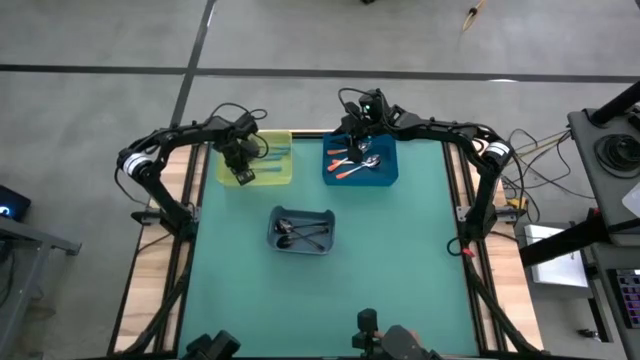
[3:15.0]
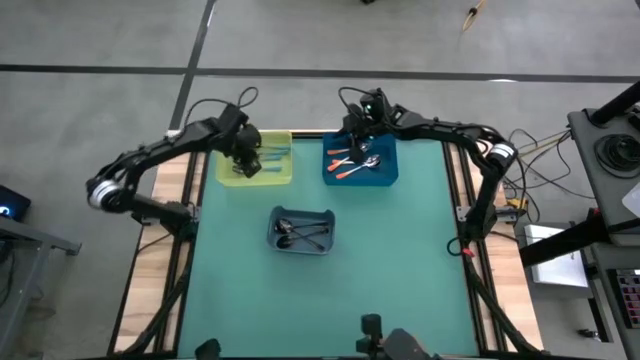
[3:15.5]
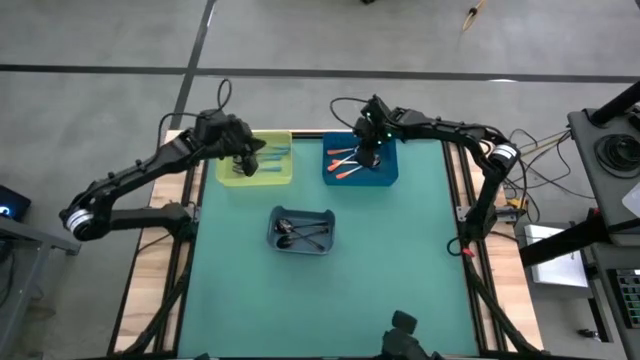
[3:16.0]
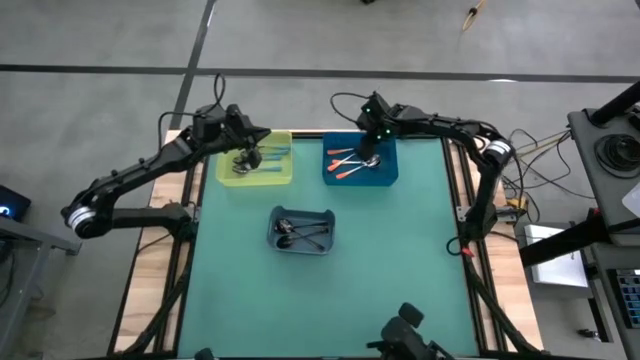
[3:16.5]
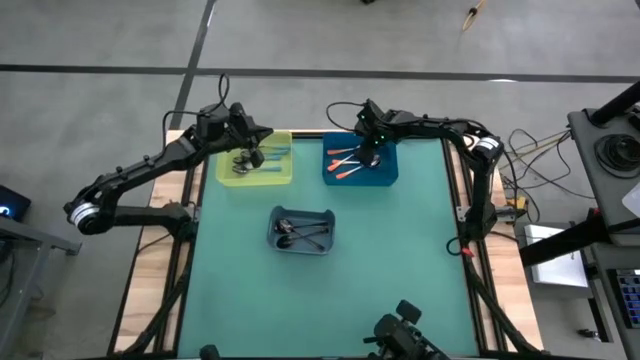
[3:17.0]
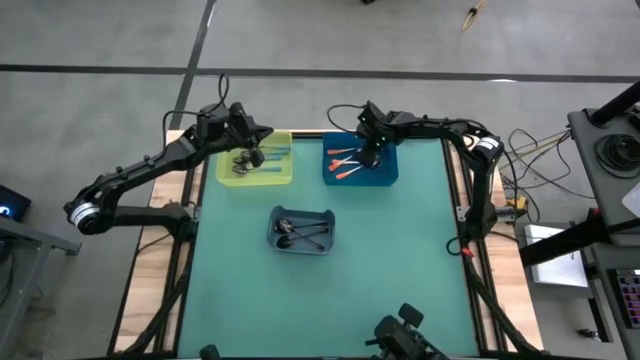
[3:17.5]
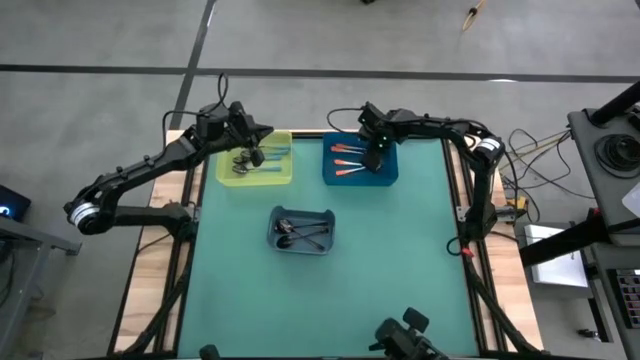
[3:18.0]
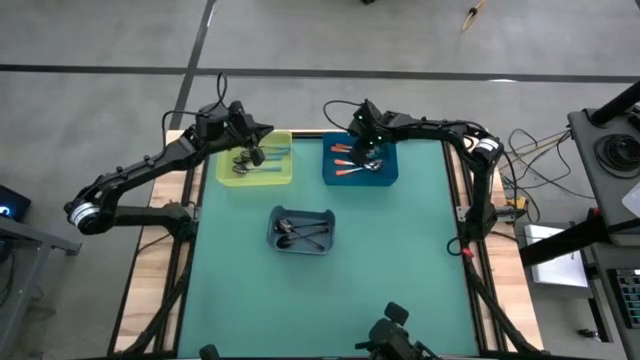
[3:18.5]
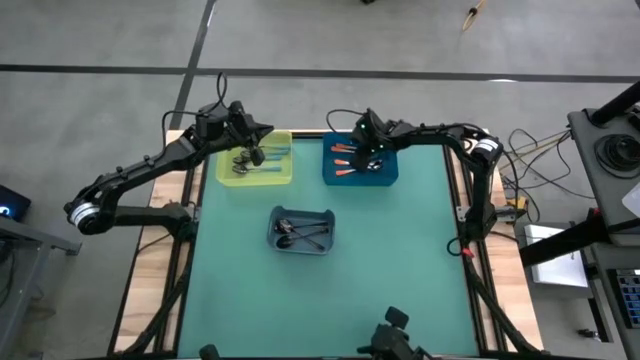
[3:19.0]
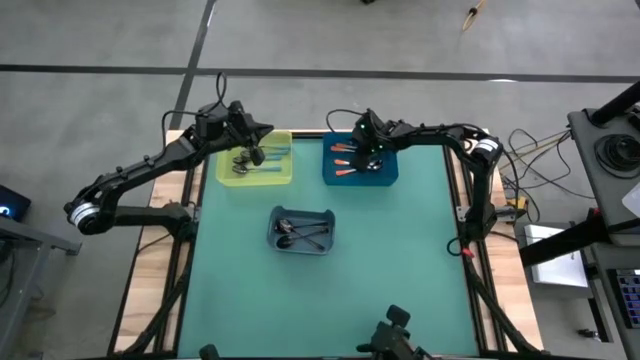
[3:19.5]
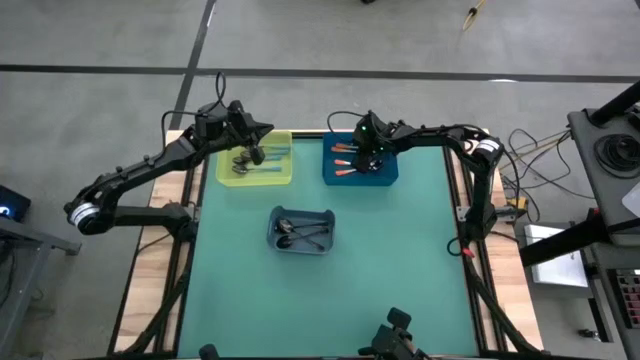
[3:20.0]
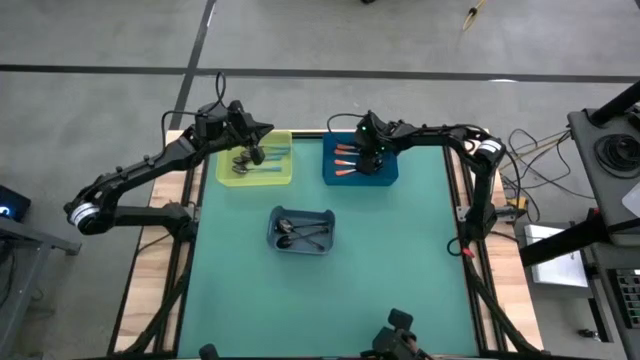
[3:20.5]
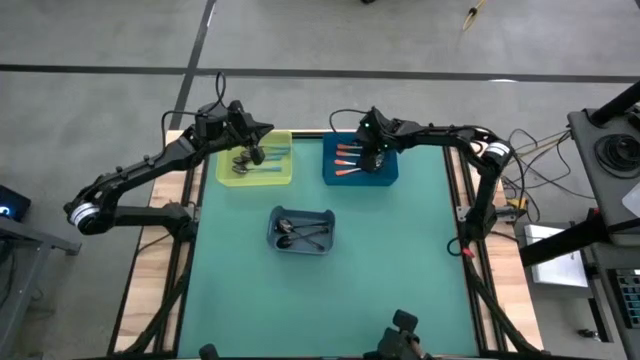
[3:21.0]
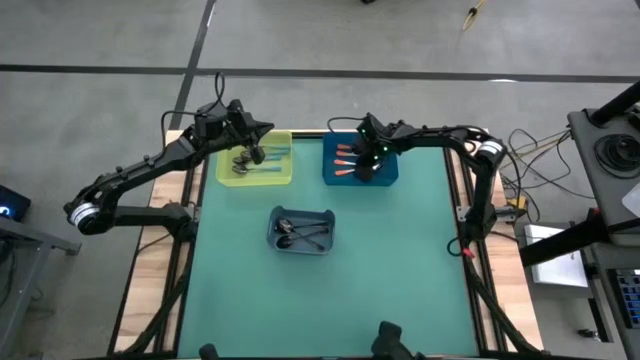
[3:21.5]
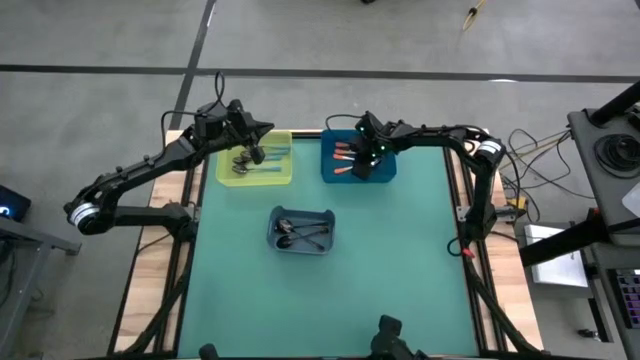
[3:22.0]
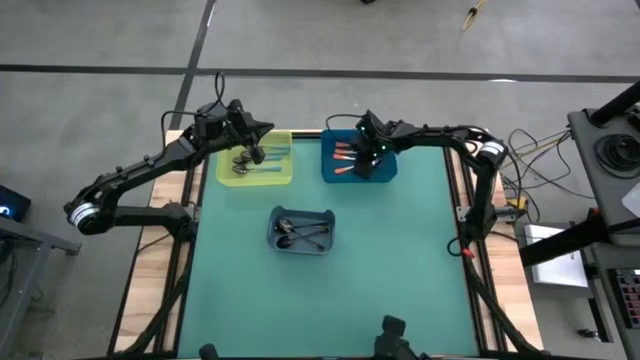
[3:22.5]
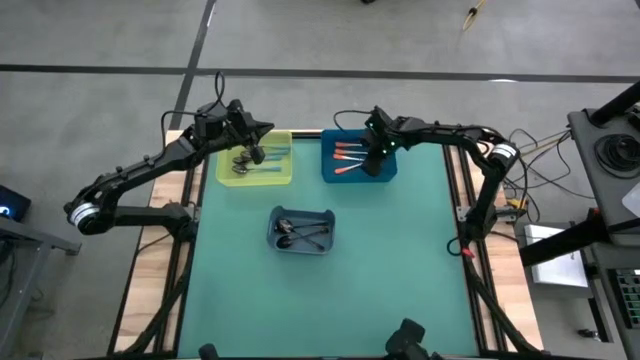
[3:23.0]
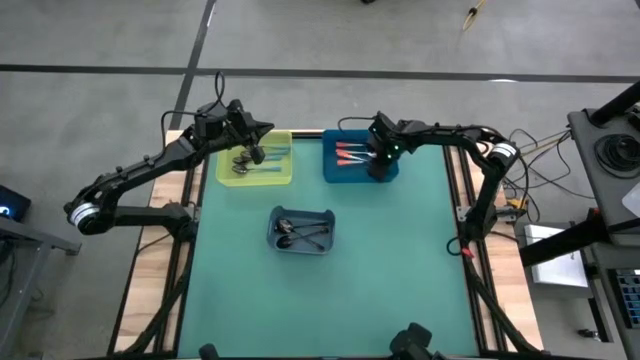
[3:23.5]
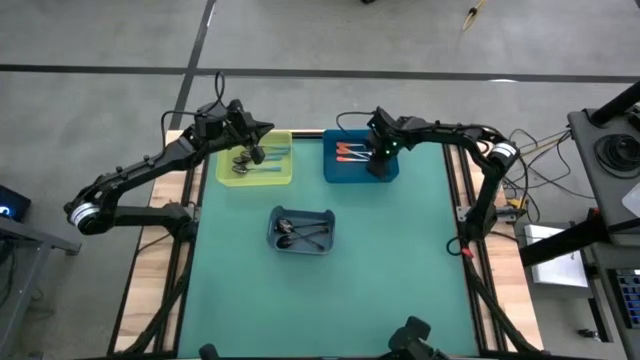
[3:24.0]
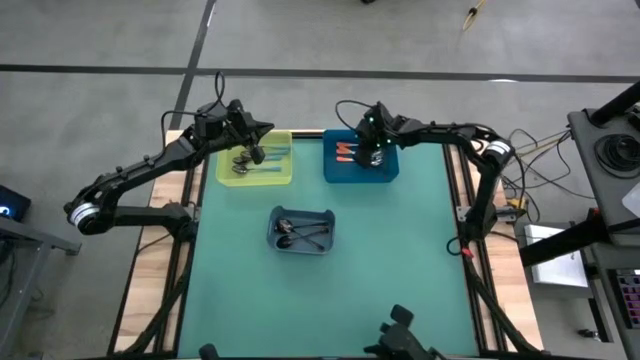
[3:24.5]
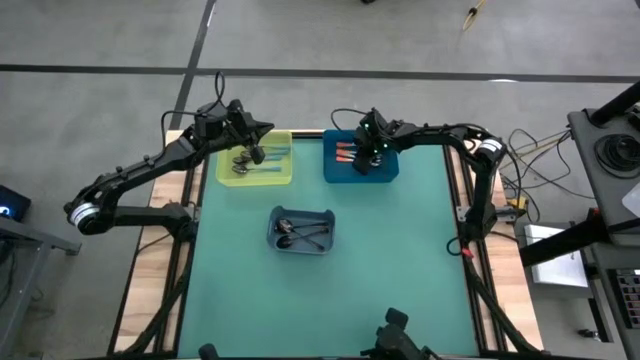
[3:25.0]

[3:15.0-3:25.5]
Task: Sort silverware by color (type)
Adjust the orange spoons in the blue bin

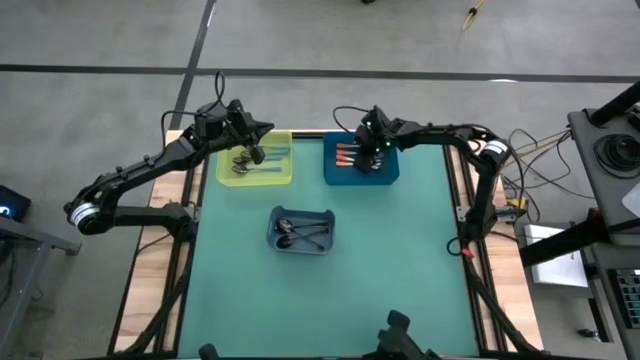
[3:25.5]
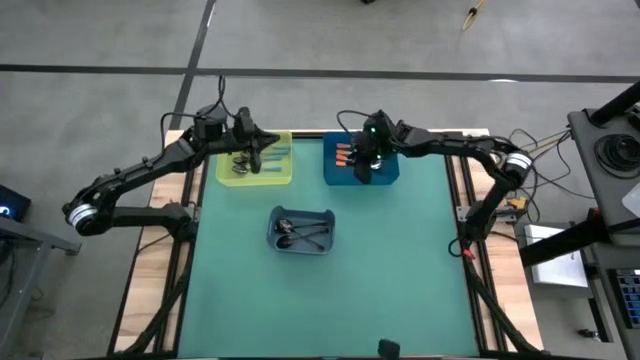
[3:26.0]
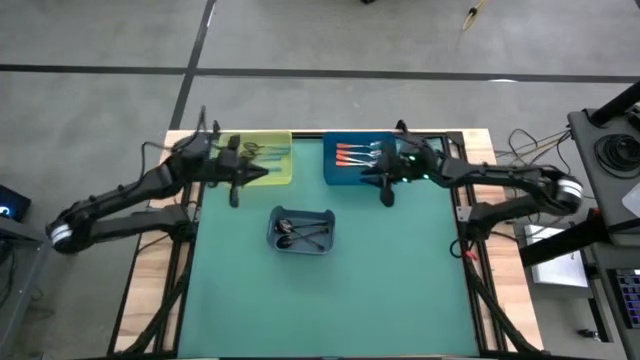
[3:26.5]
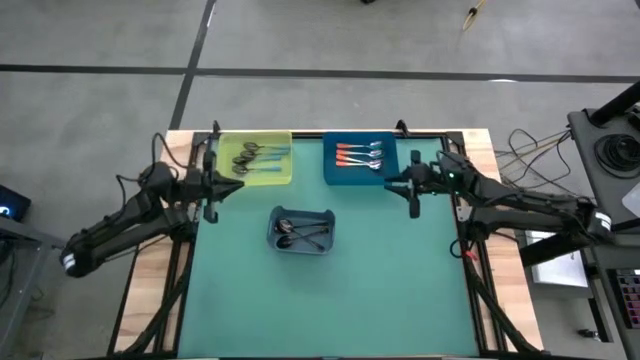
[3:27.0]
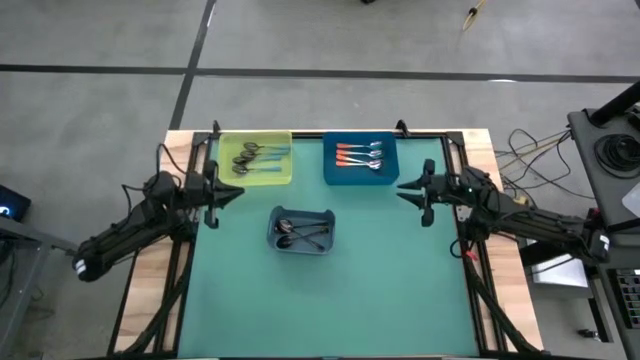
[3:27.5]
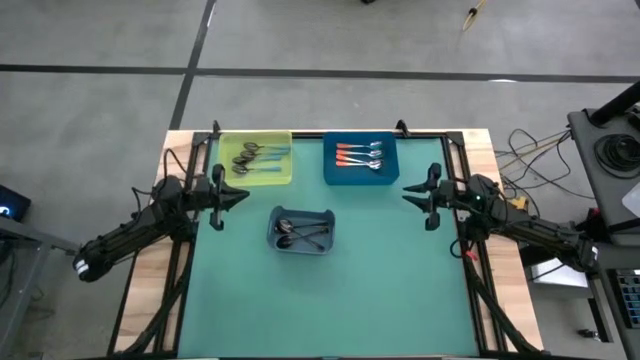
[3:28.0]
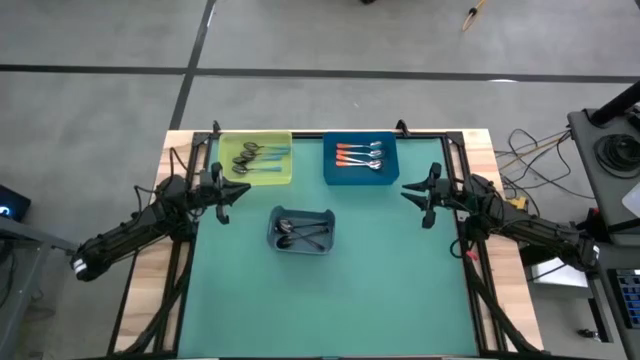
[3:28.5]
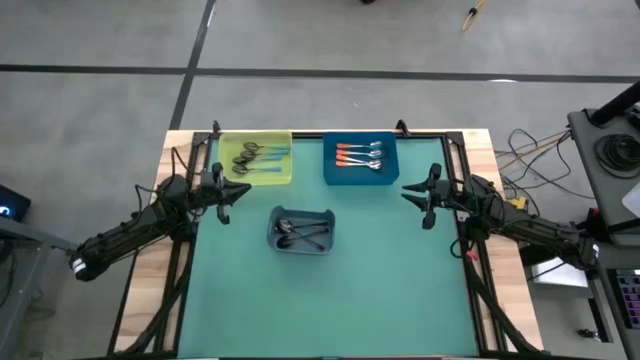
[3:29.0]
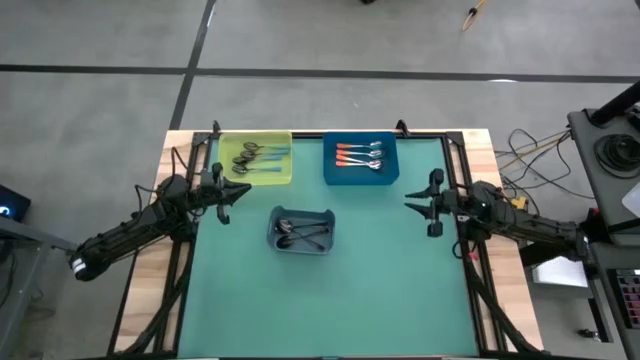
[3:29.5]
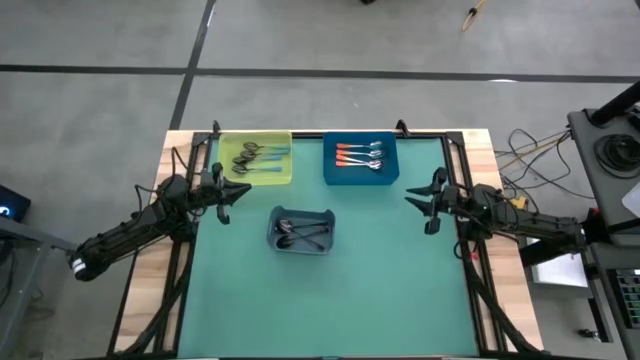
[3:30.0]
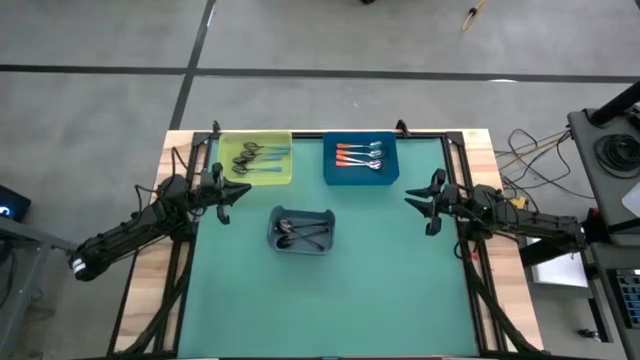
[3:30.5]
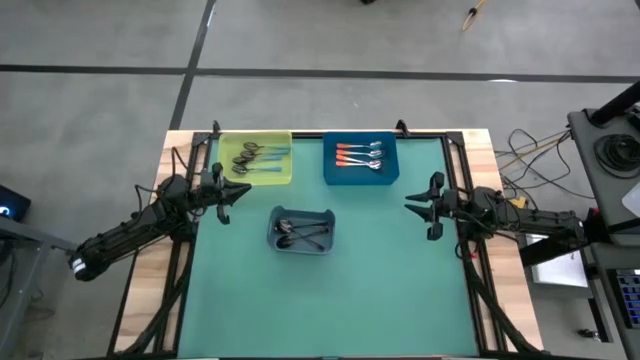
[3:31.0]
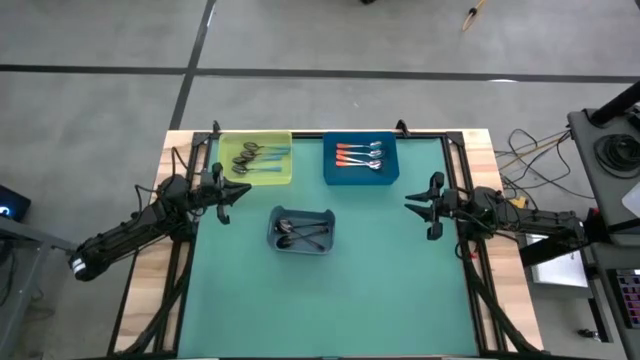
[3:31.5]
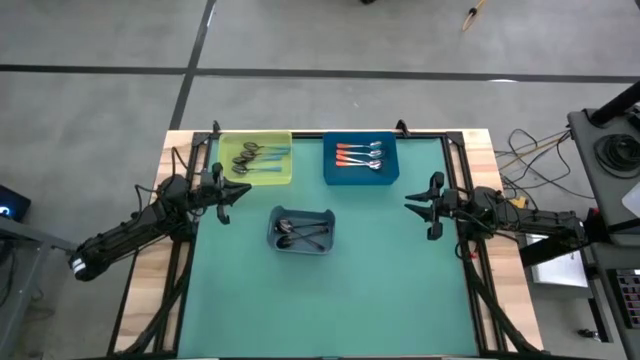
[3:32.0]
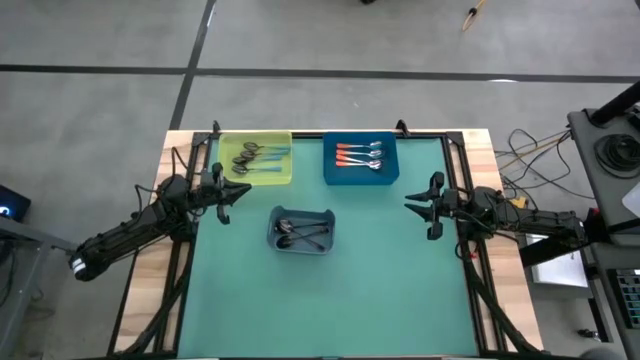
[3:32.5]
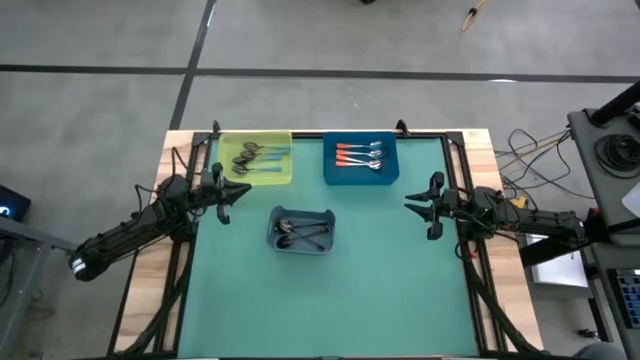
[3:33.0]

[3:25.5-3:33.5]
Return to Home Position

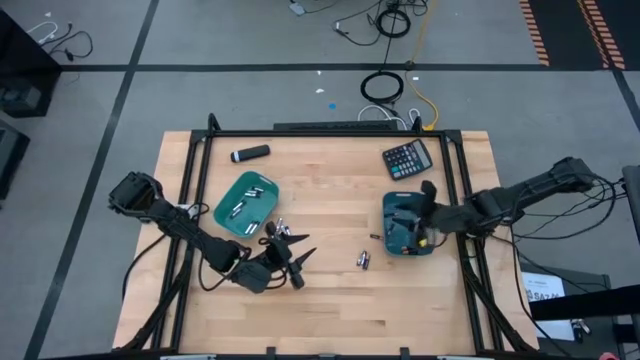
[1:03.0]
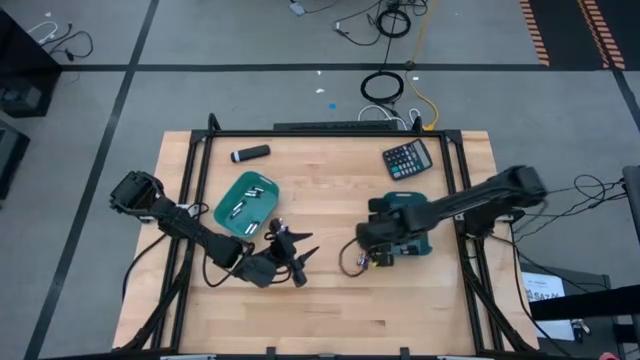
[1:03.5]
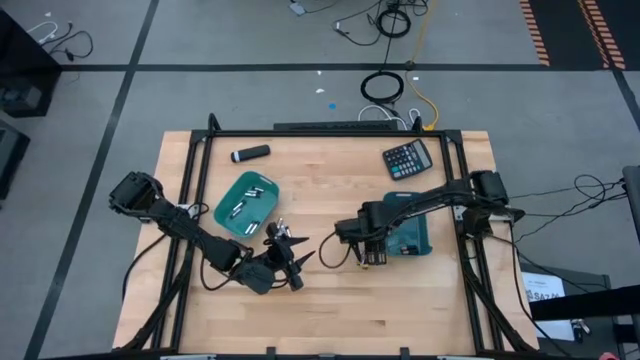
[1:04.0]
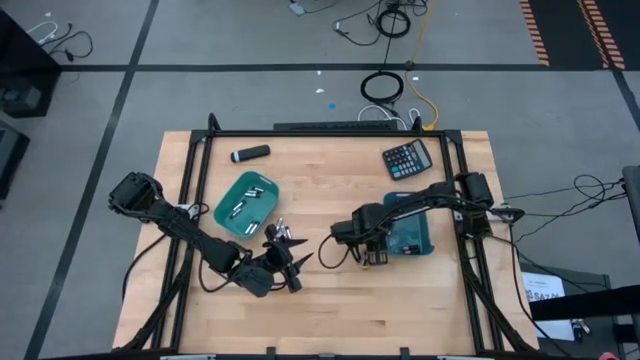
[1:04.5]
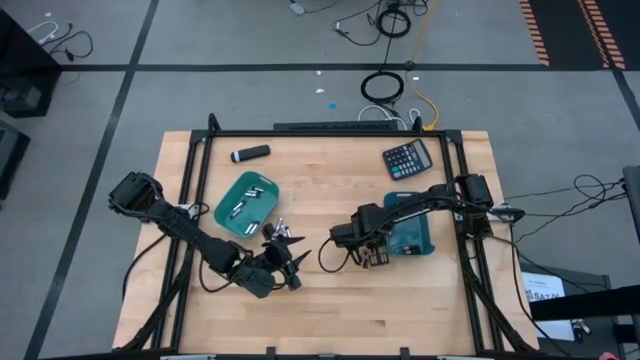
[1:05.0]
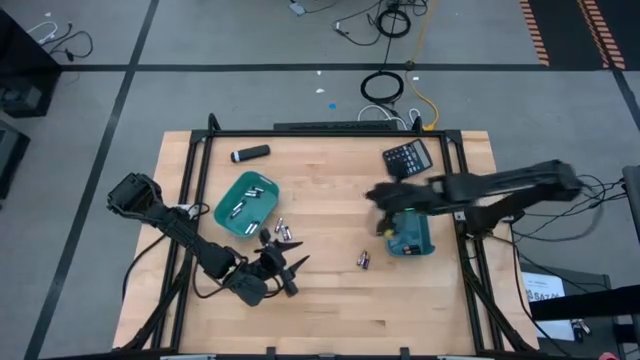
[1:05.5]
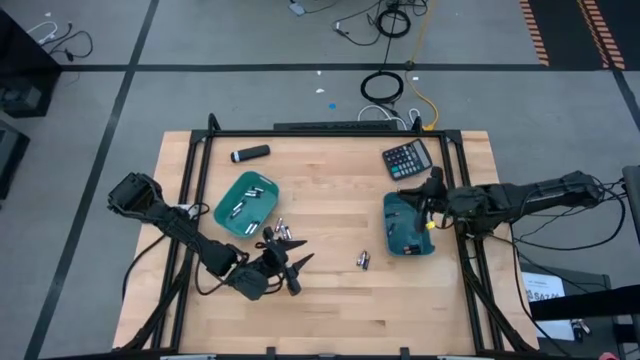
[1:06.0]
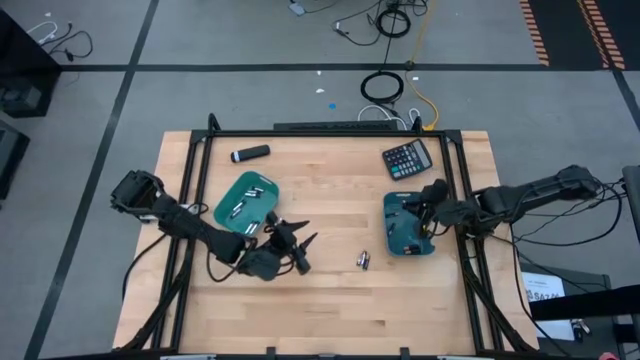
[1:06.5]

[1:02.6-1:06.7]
Task: Sort batteries
Put the black battery into the blue bin
